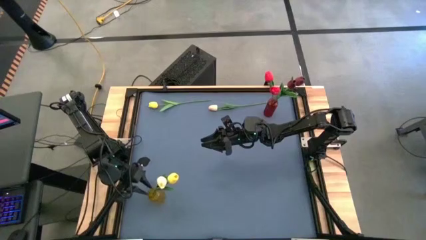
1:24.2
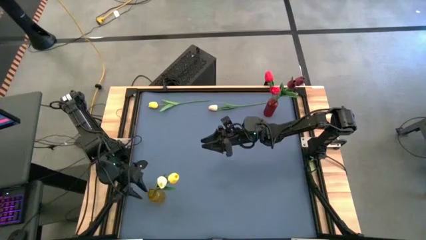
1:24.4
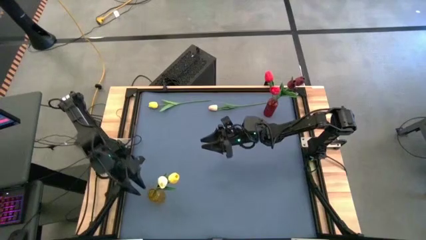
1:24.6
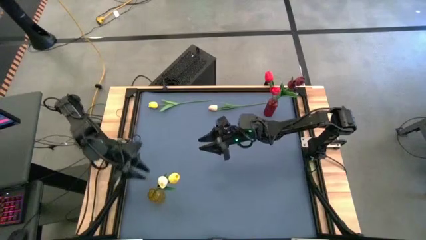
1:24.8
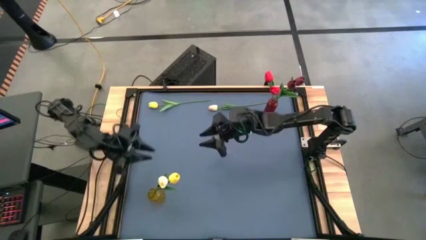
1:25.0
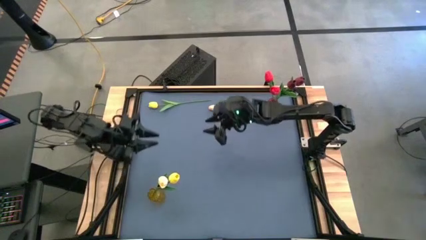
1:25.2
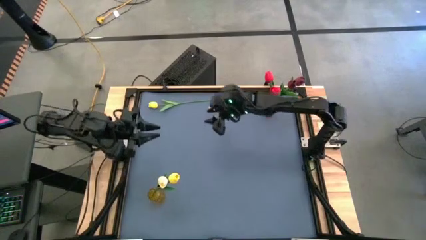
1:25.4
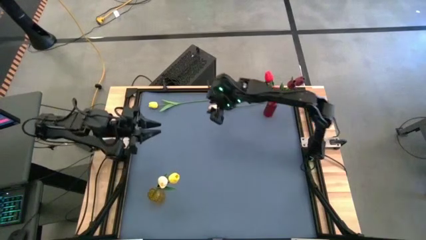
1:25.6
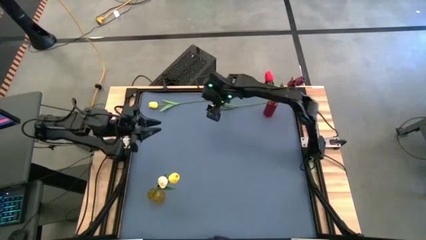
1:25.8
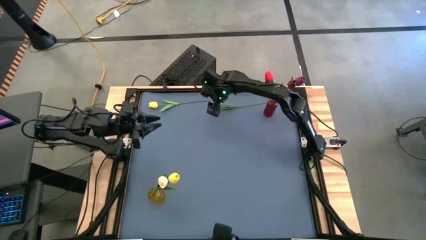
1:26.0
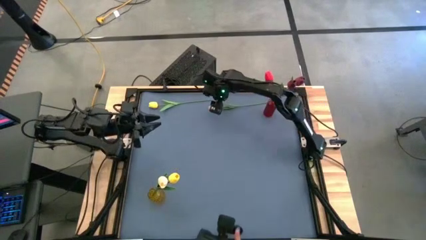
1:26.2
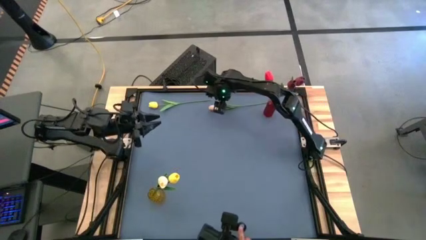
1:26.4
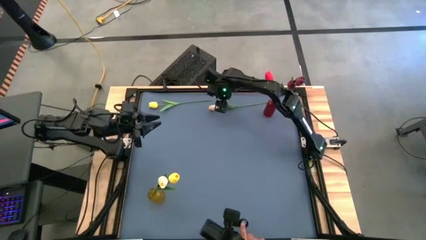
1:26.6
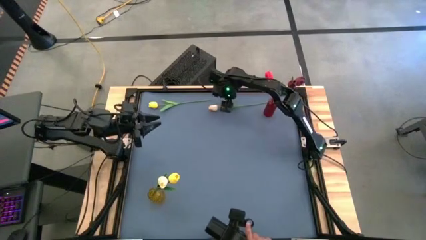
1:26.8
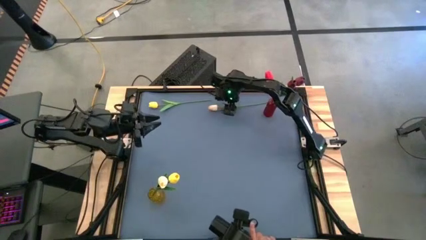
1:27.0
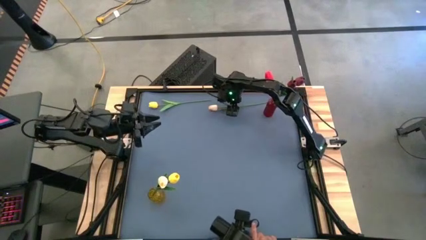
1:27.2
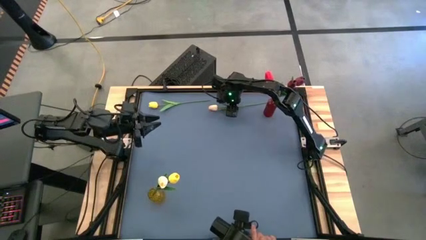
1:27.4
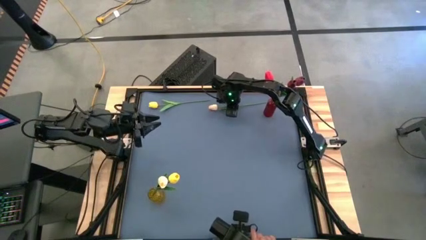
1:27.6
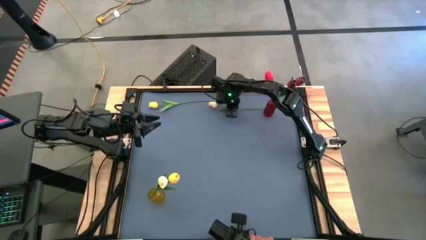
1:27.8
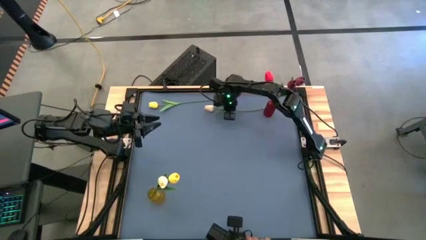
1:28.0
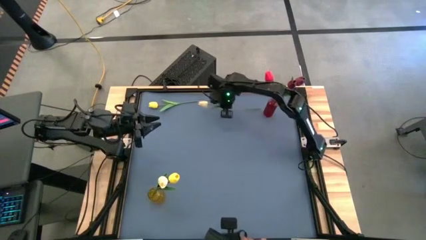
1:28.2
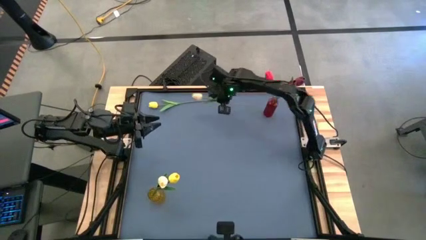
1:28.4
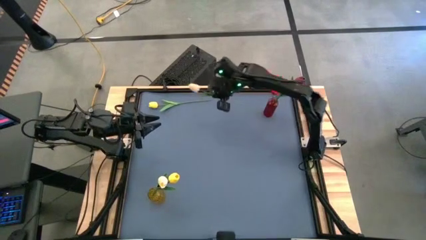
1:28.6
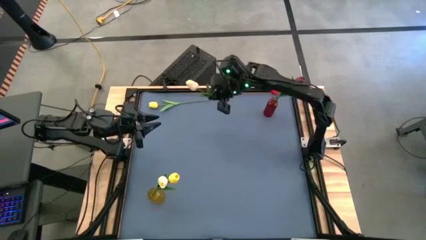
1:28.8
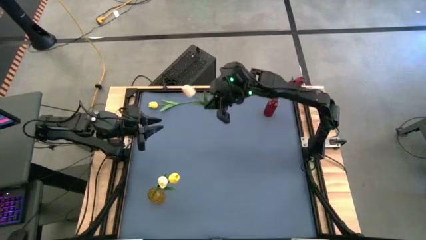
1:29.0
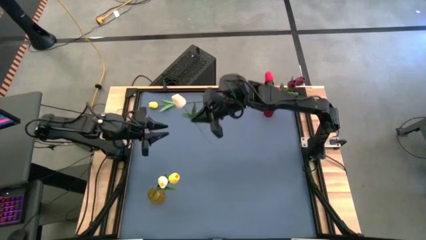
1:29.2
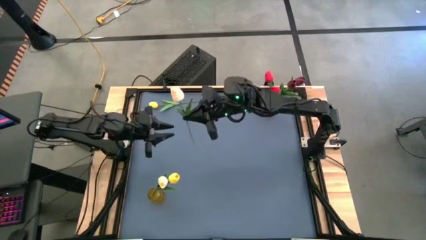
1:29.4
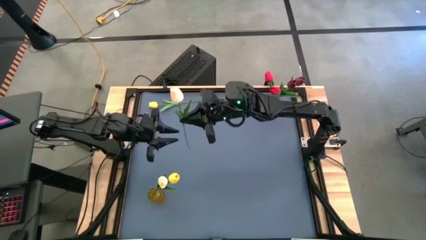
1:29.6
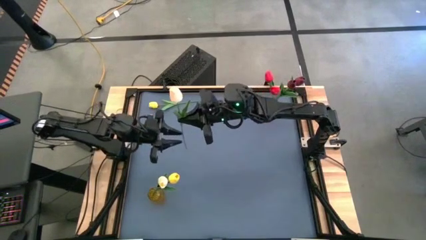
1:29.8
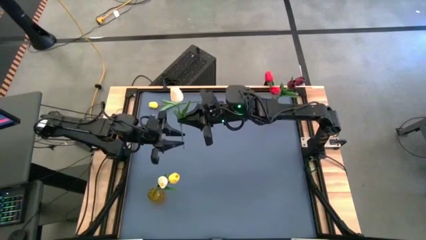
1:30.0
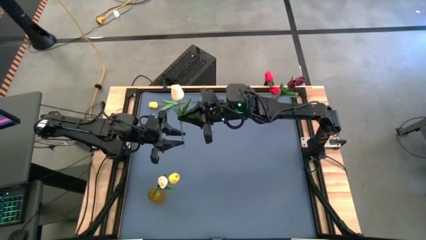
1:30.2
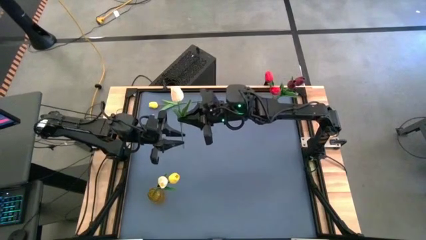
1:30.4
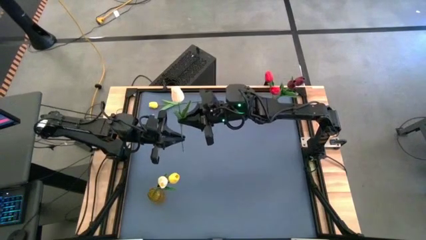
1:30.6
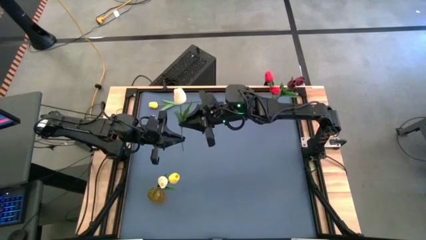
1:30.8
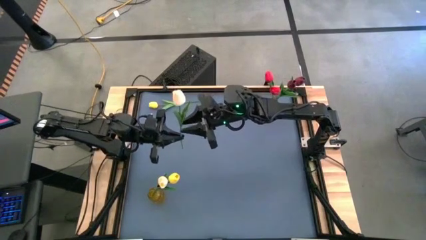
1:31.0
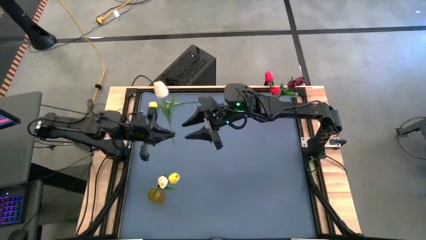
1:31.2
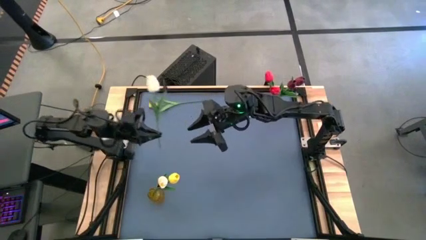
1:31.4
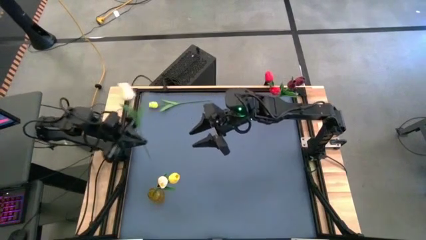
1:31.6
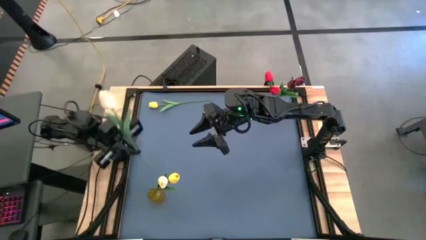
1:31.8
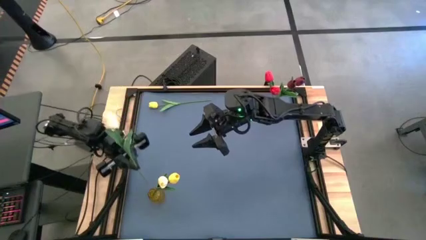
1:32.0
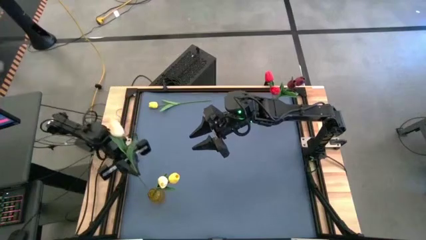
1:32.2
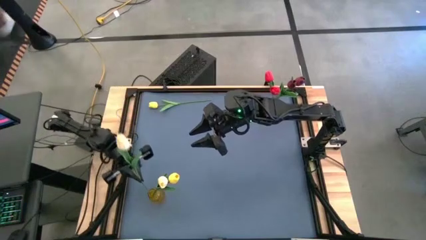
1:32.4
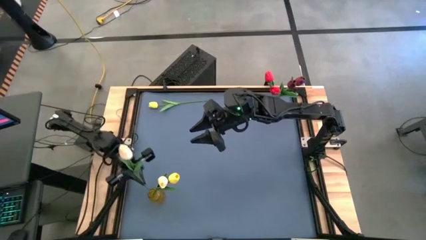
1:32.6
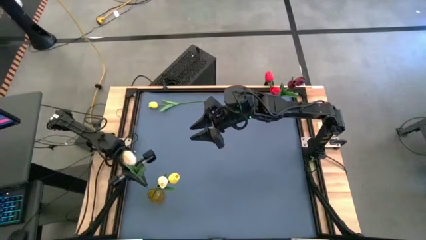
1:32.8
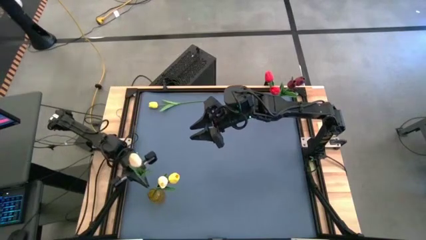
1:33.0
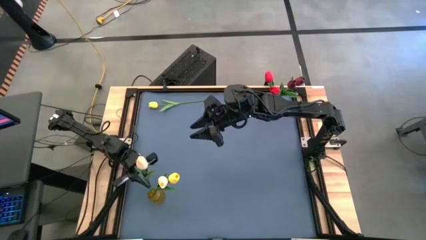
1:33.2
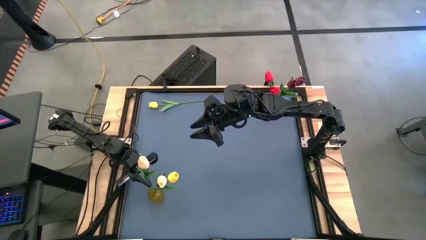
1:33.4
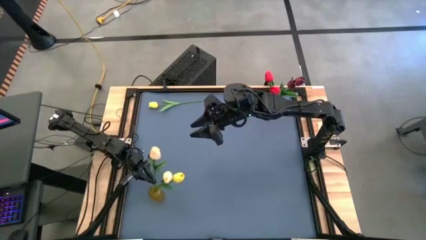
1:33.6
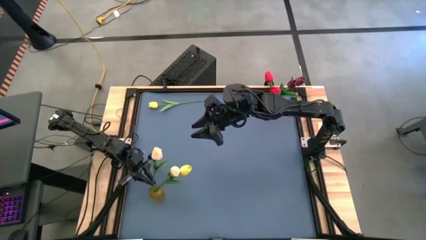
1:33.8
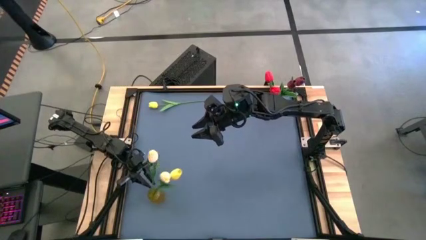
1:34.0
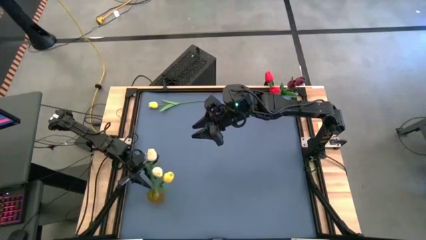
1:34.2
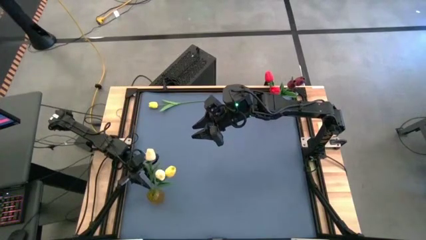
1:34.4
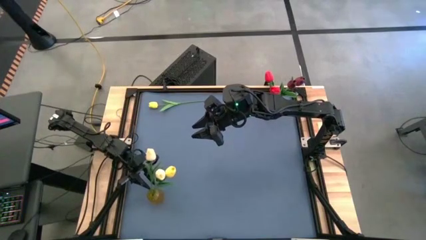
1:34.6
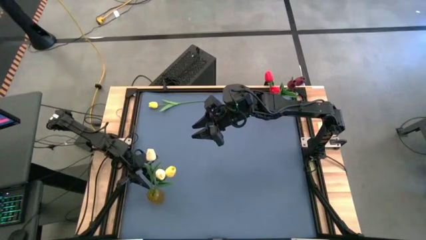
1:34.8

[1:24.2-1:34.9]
Task: Sort flowers into vase by color
Put the white flower into the yellow vase
